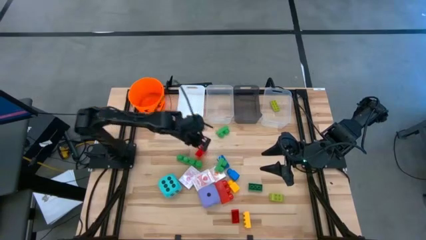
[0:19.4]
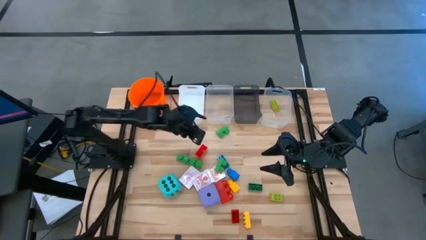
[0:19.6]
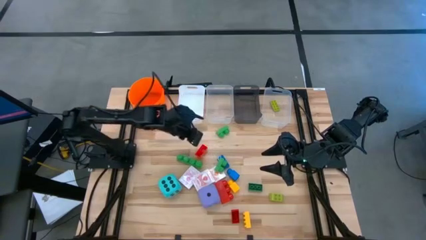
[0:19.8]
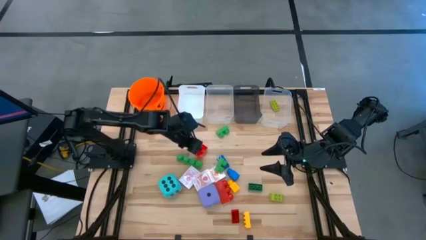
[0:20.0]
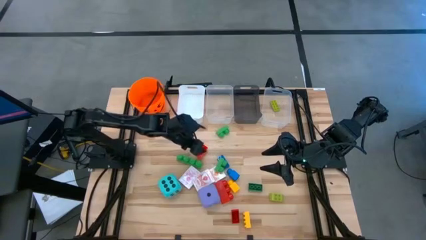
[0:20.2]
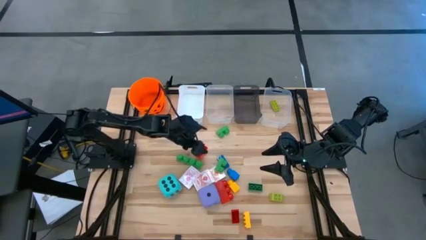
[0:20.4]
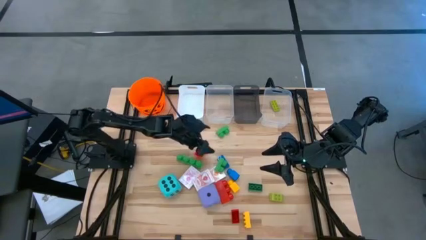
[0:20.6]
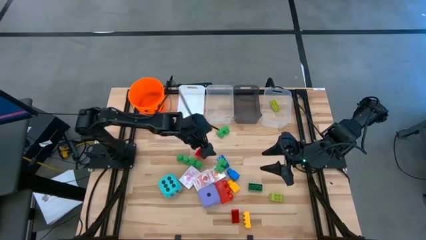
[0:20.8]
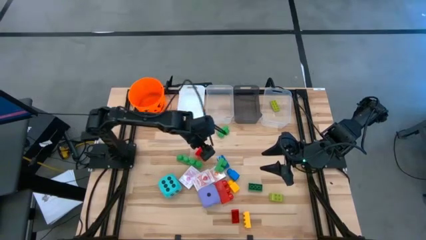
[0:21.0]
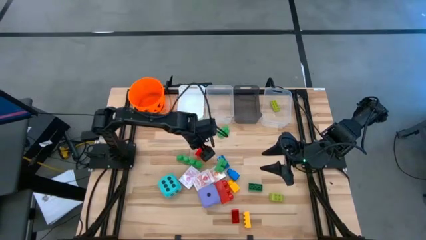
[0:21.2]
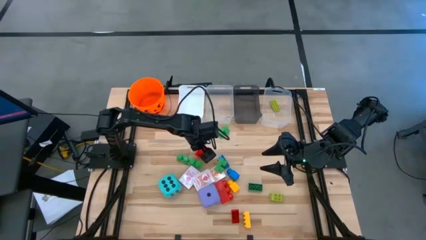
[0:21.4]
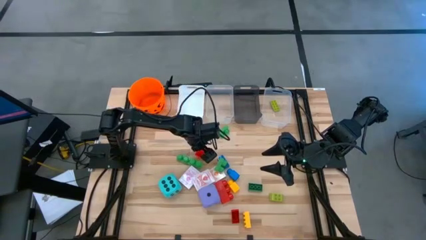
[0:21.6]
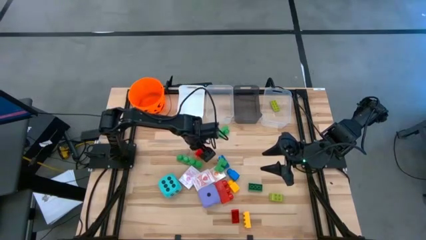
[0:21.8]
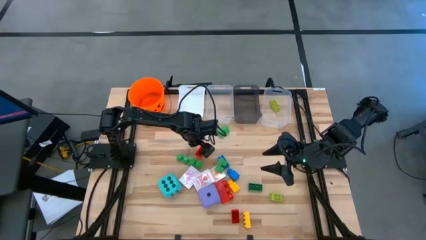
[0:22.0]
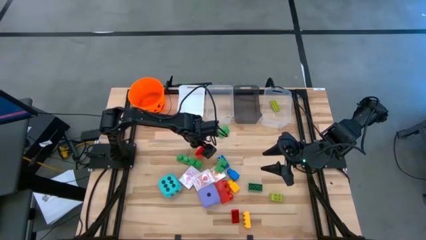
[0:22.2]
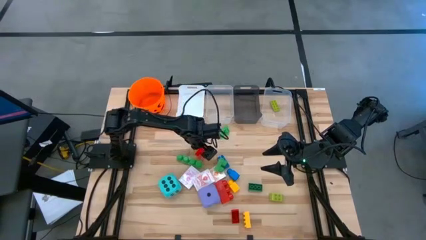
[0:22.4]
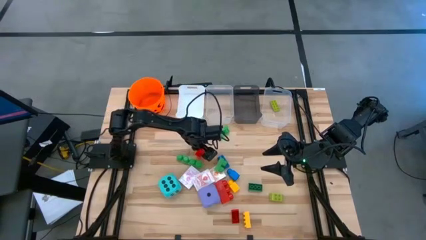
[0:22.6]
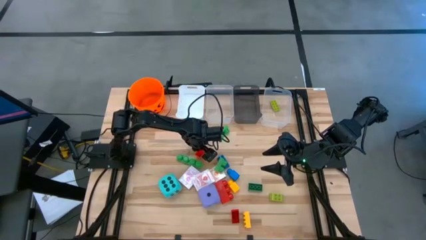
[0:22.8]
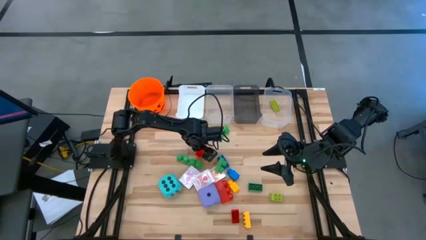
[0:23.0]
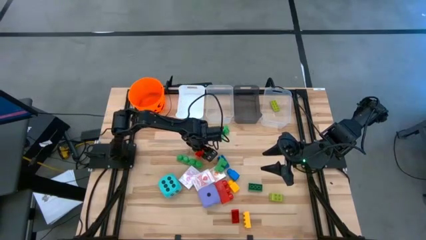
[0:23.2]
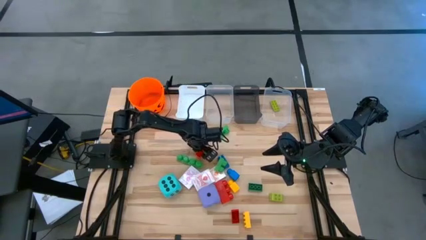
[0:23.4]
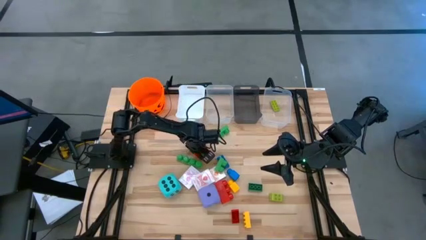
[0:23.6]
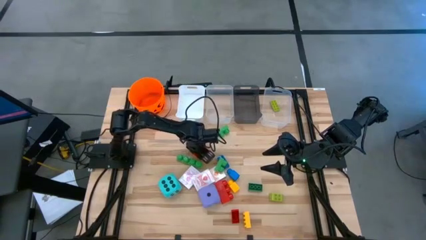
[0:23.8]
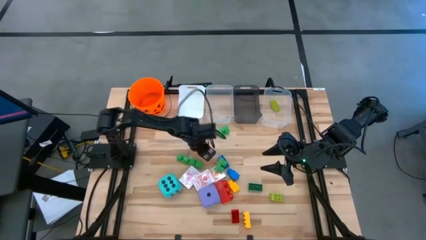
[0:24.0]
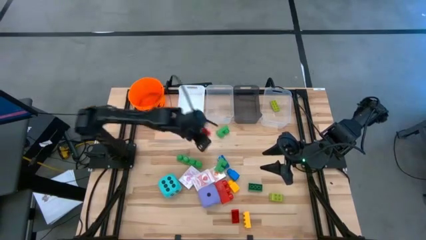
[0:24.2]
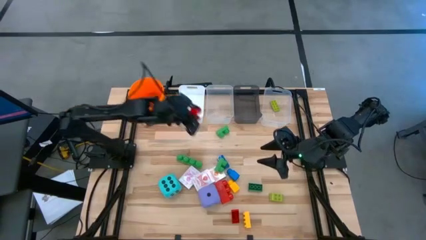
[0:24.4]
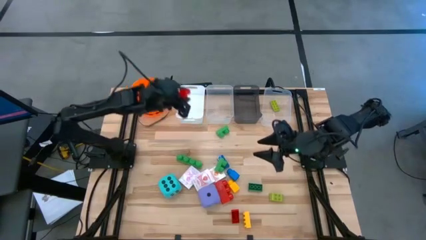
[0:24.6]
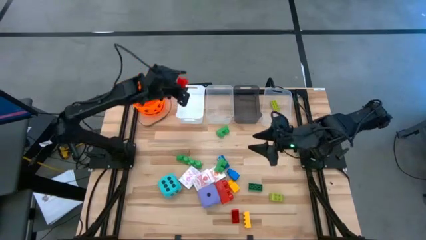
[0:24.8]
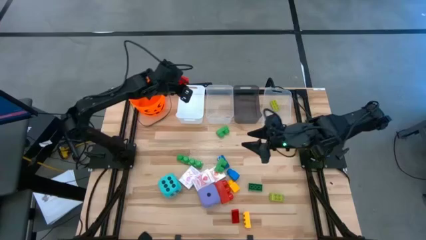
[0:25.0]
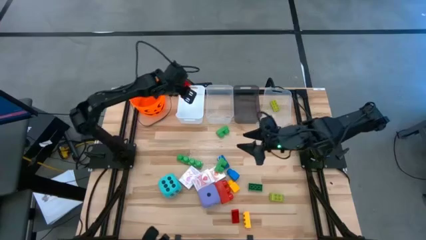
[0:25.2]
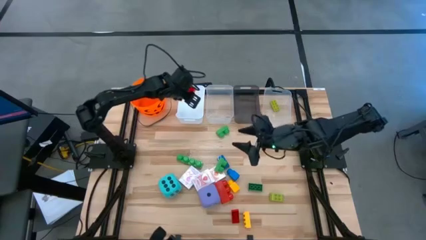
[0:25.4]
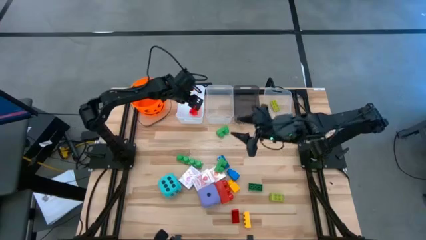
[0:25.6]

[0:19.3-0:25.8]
Task: Pick & Place Toys
Put the 2 stud red game piece into the white bin

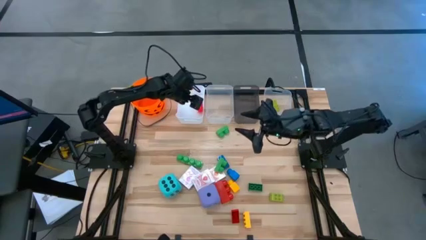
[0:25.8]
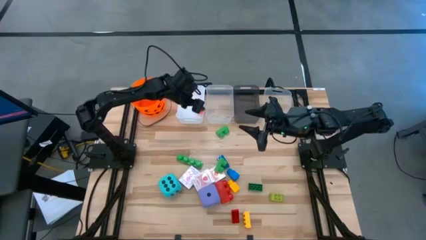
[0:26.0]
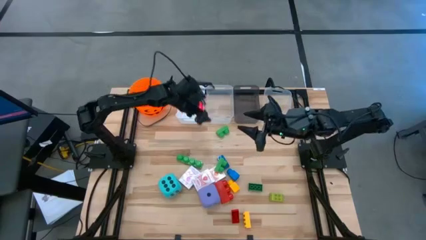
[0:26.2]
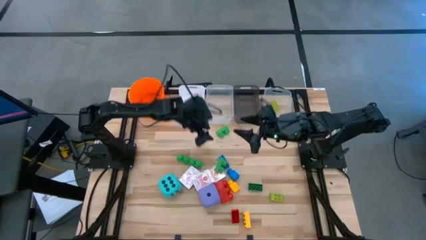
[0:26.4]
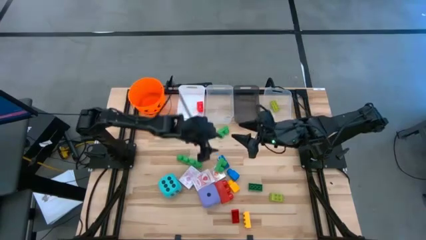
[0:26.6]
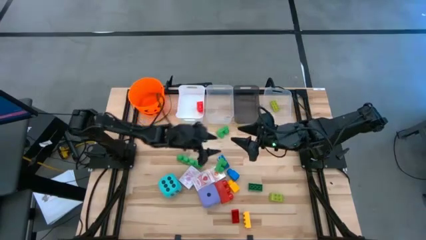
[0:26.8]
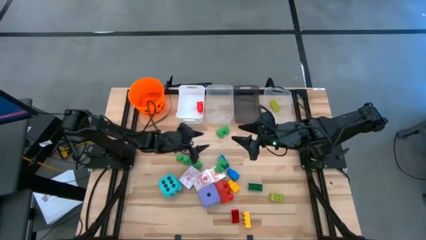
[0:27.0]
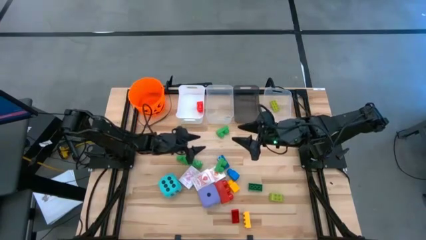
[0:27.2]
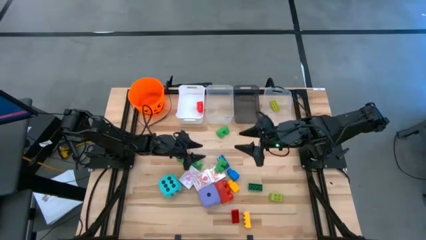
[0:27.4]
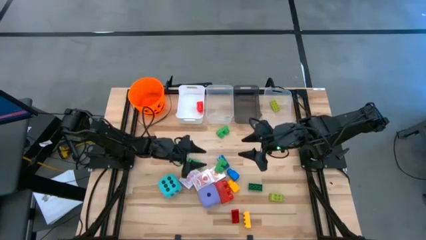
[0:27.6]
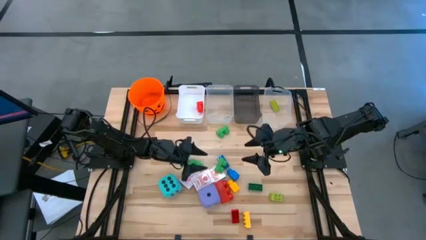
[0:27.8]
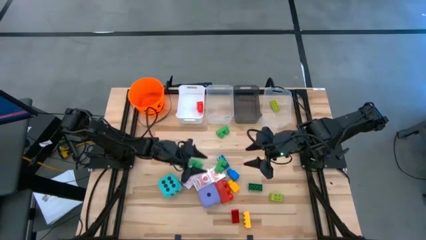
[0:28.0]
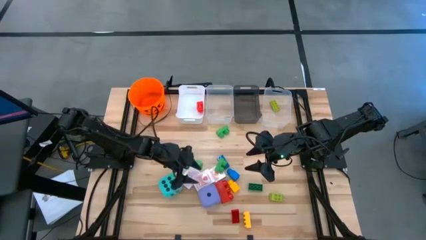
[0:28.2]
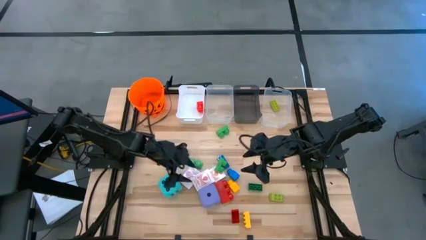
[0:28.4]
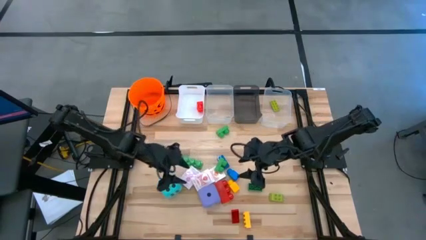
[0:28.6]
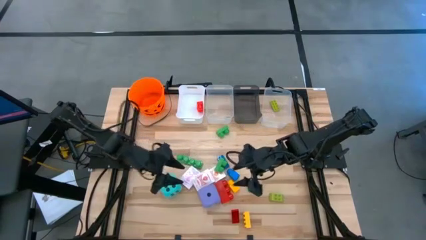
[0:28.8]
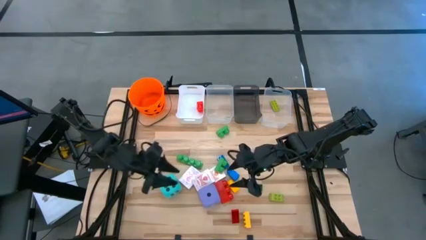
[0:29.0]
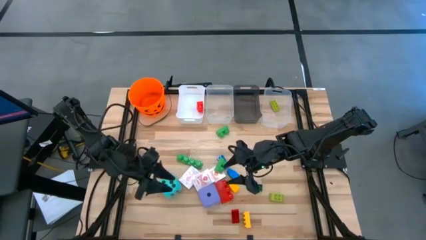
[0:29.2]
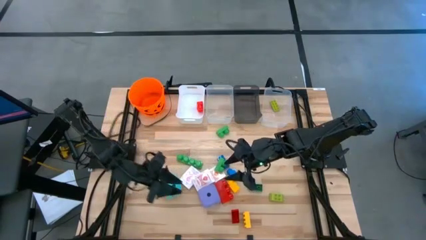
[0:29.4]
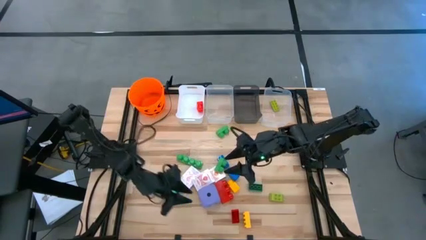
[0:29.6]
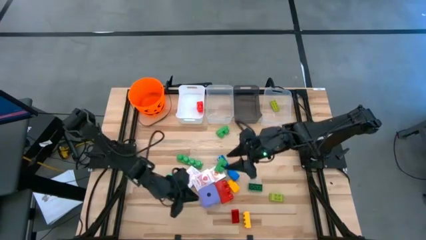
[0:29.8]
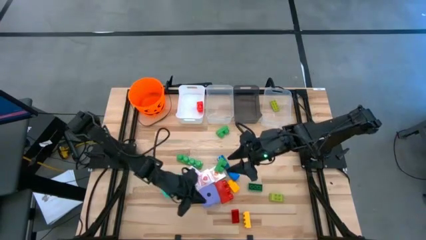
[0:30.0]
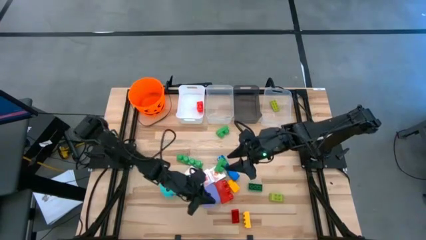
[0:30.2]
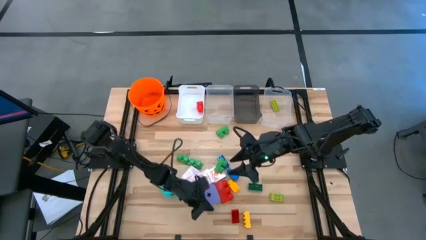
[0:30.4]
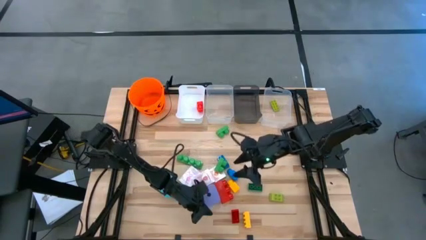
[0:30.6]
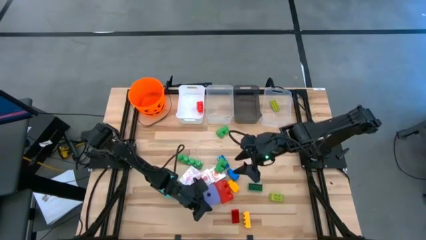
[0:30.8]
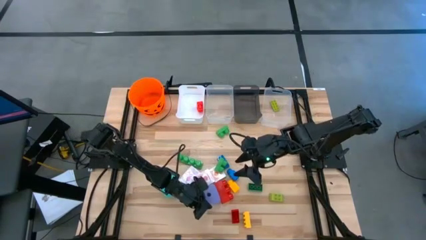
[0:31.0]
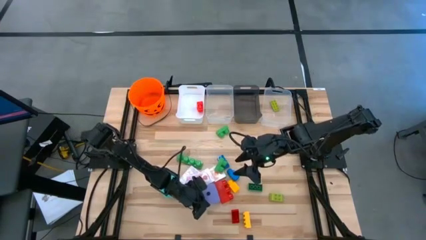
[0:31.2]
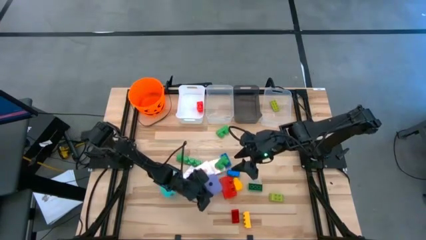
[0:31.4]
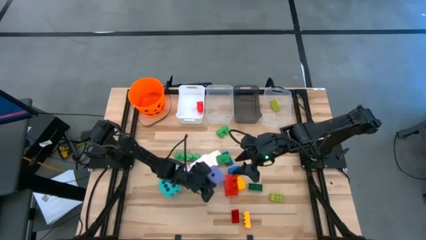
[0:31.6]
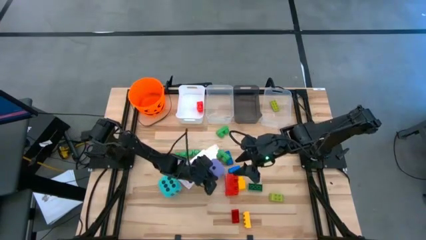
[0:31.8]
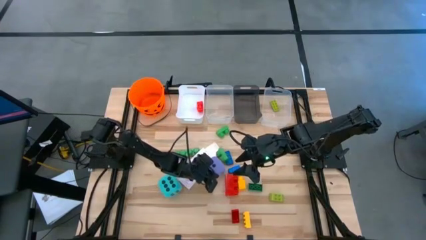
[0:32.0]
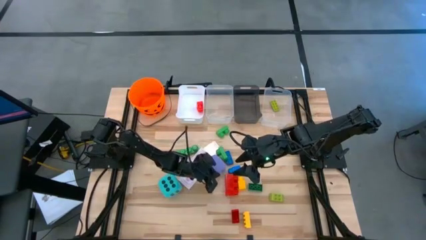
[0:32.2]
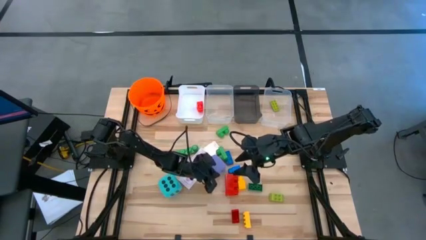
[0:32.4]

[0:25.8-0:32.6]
Move the purple dice to the center of the table

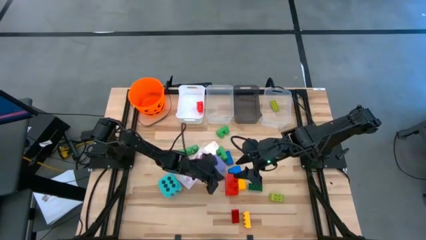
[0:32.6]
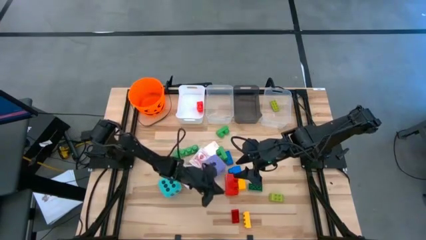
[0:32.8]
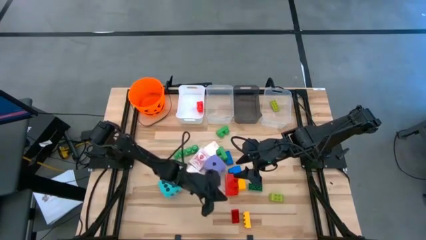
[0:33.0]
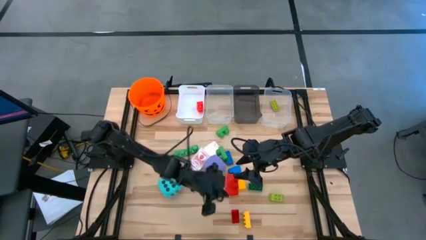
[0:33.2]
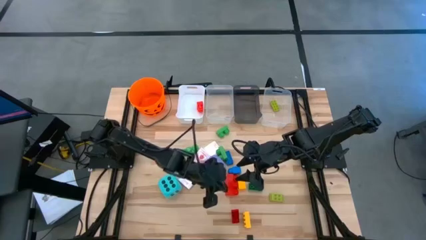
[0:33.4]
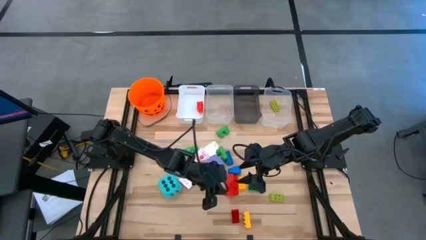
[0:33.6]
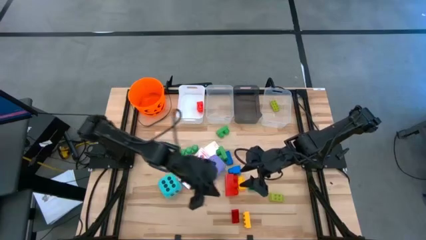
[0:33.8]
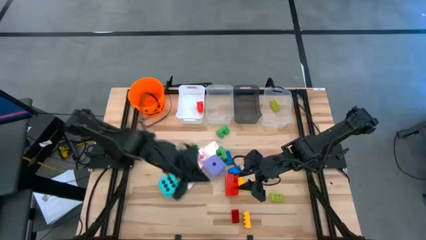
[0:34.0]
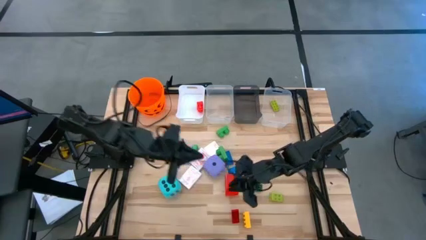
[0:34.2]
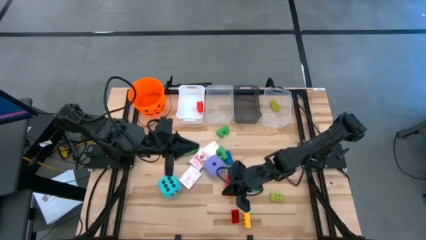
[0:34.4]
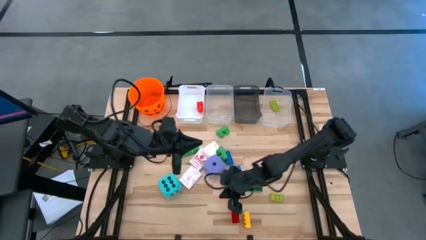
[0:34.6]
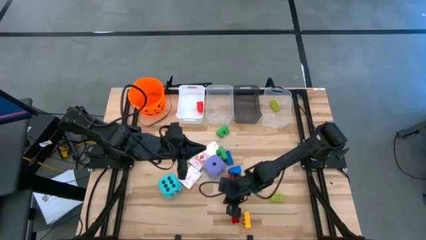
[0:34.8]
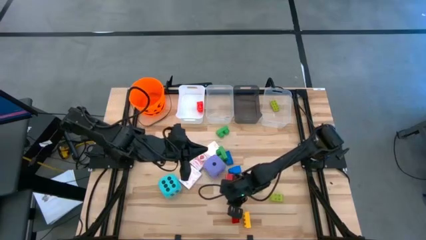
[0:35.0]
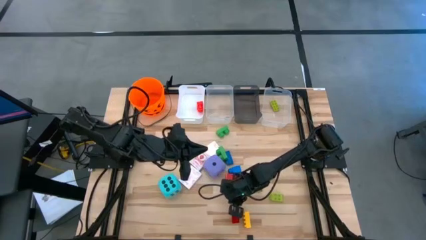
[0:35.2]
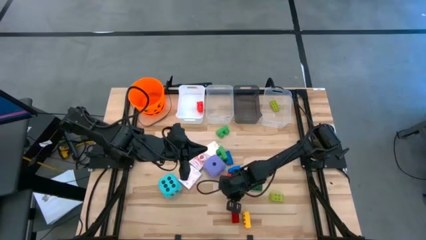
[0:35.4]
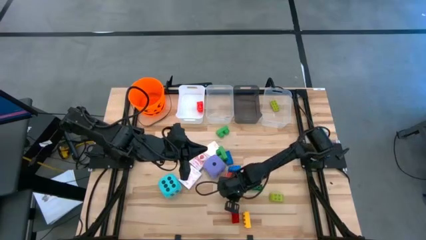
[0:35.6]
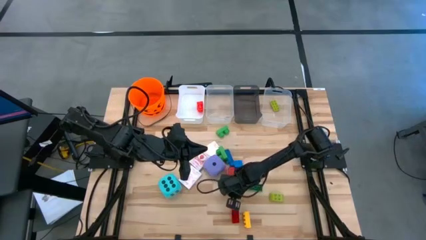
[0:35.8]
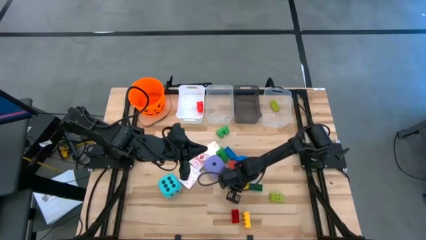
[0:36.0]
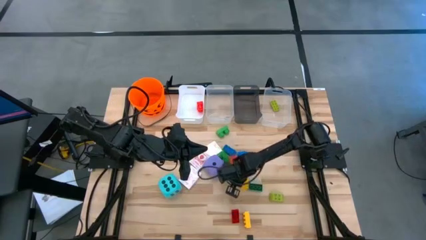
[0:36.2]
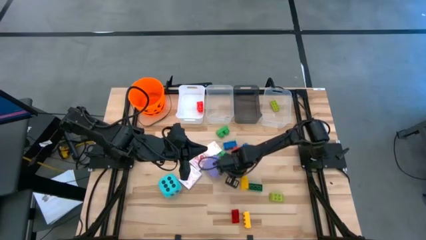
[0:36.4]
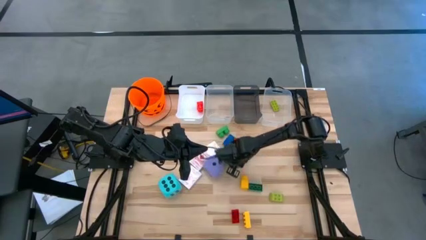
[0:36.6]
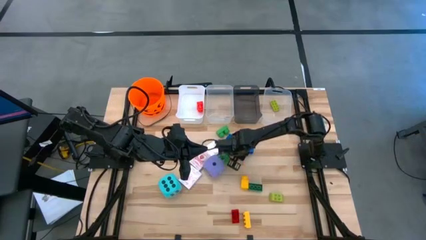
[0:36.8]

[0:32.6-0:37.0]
Move the 3 stud red game piece to the top center of the table
